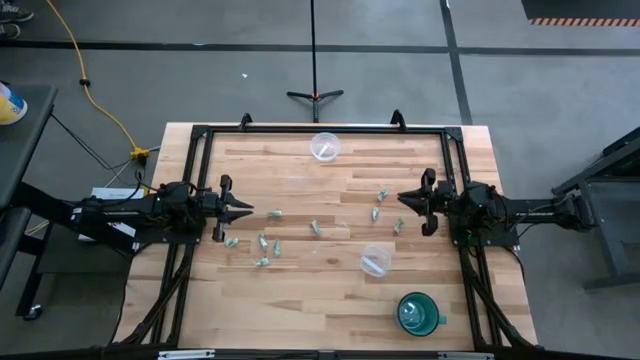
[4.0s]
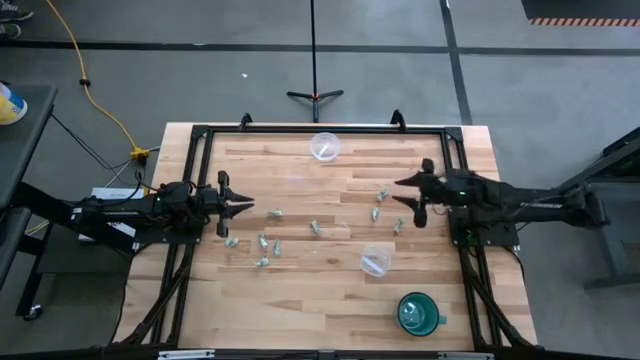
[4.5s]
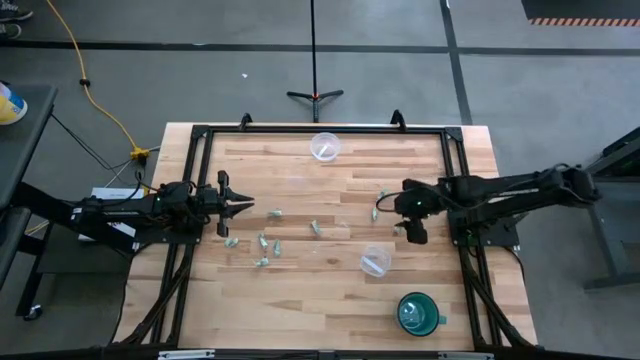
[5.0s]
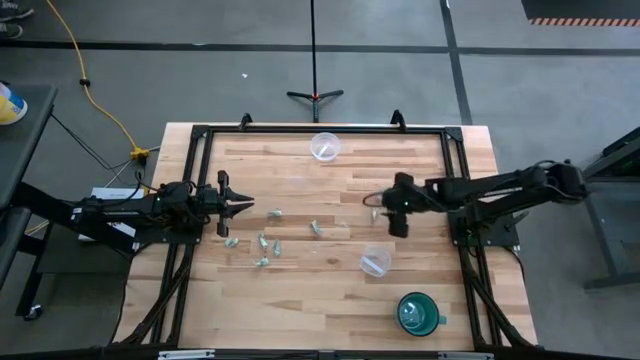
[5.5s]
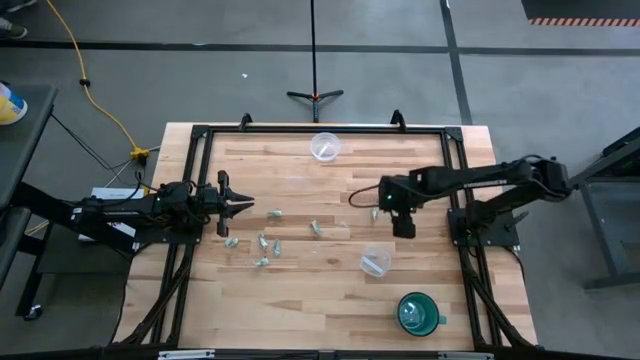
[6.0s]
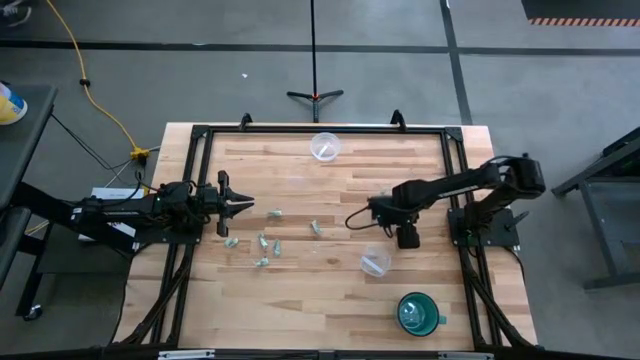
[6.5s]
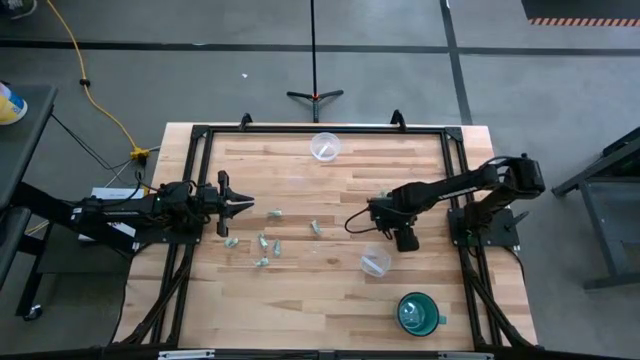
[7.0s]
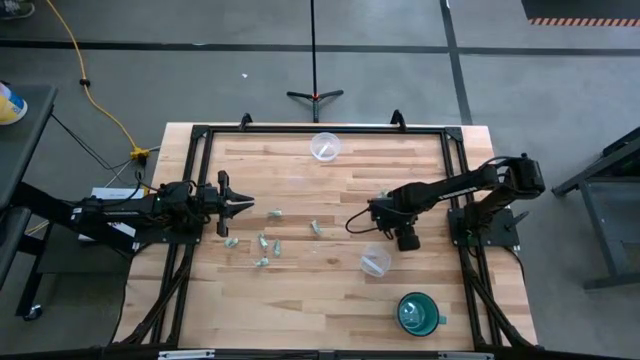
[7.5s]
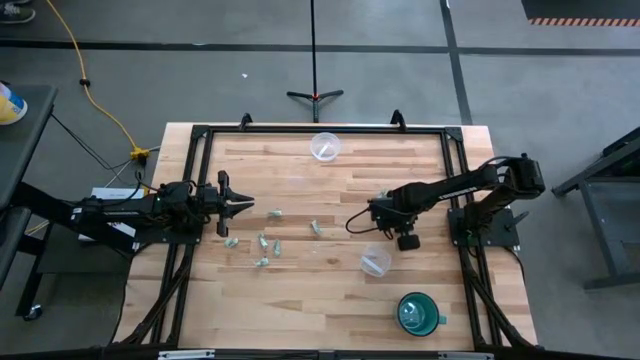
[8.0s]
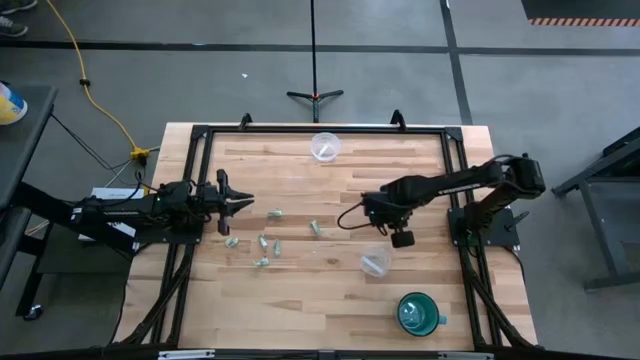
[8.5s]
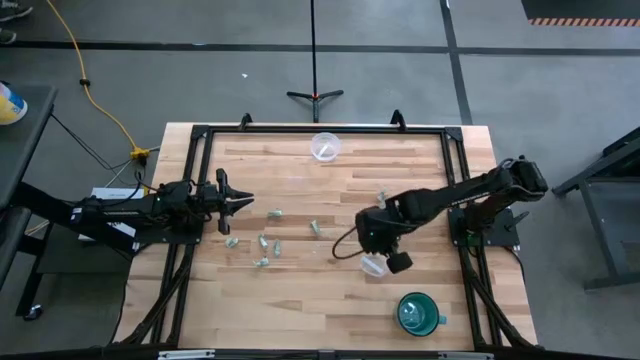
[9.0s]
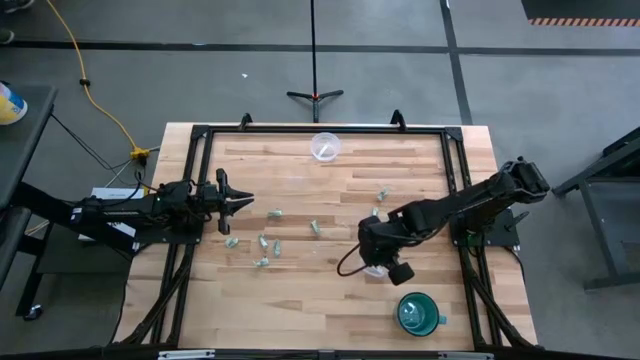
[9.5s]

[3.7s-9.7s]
Task: Pick and place Stevia / Truvia into bins
Put the light green stevia packet into the bottom transparent container

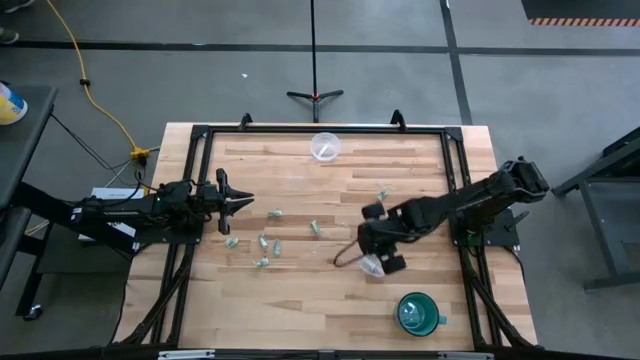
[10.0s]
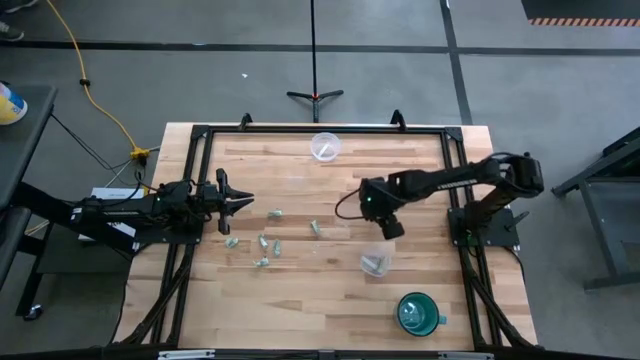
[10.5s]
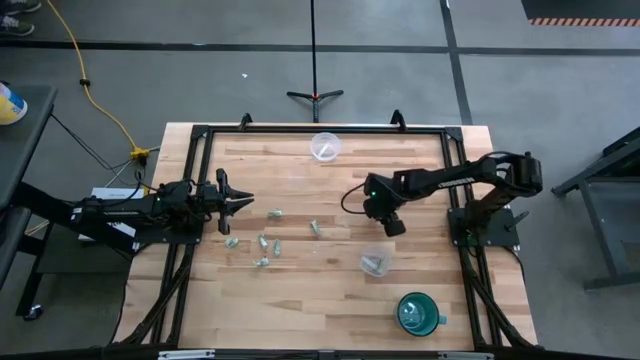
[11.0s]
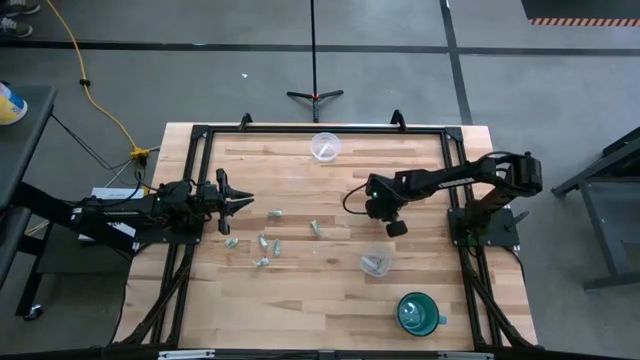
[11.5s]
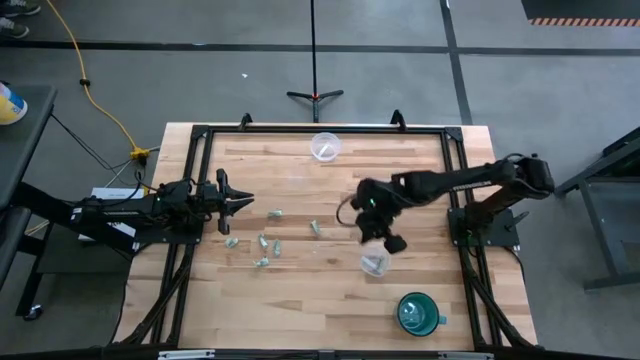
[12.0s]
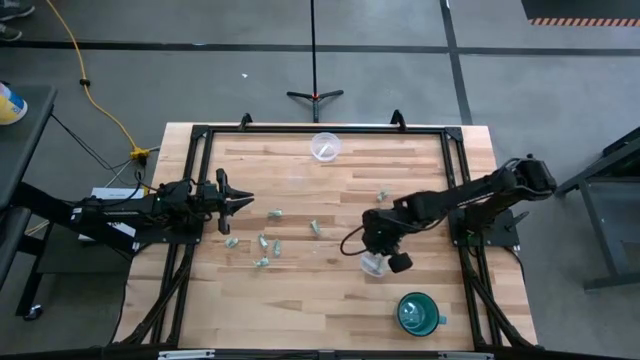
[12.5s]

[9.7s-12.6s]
Put the light green stevia packet into the bottom transparent container

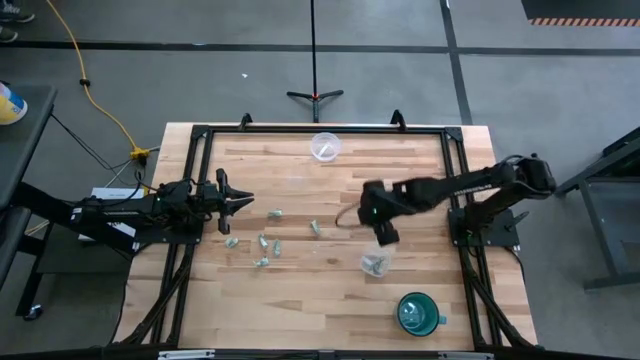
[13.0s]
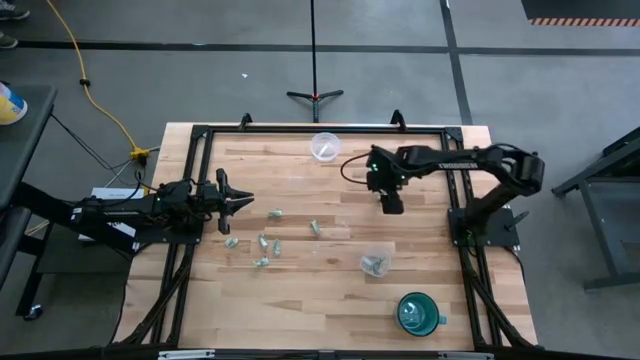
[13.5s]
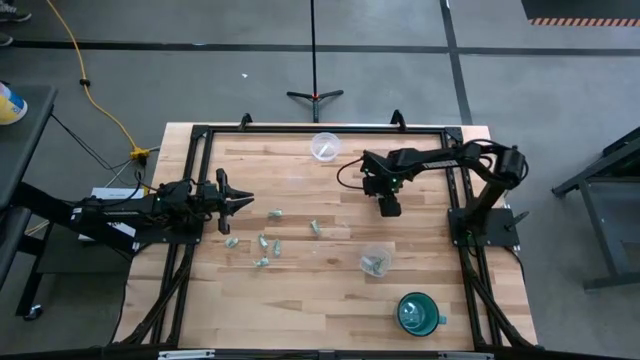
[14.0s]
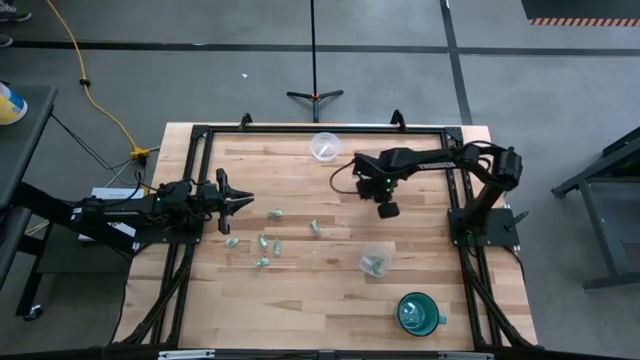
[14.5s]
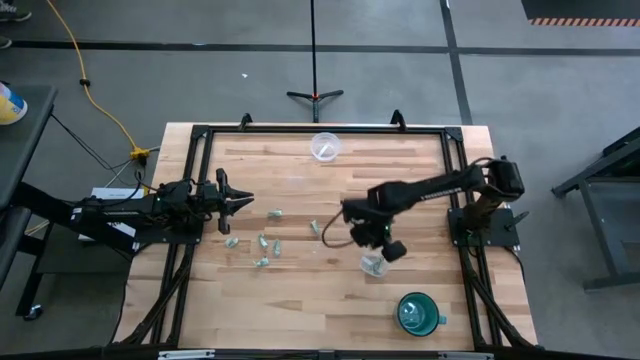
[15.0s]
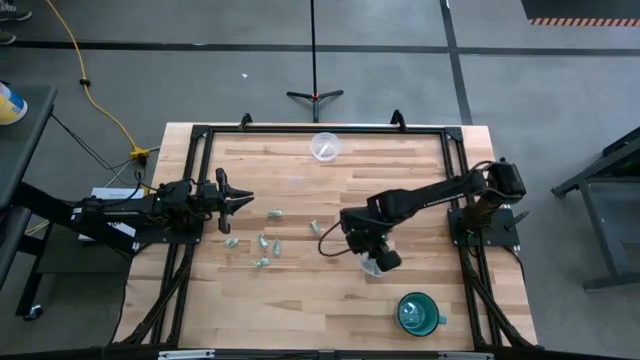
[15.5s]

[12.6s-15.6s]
Put the light green stevia packet into the bottom transparent container

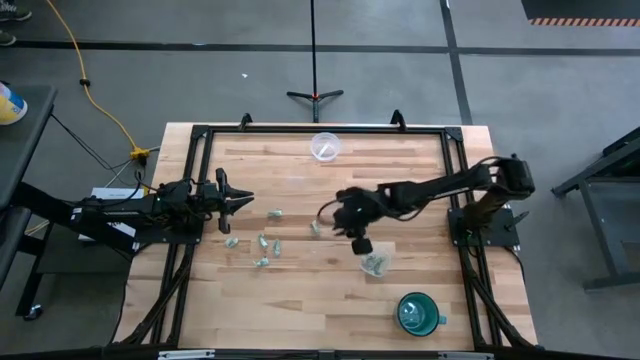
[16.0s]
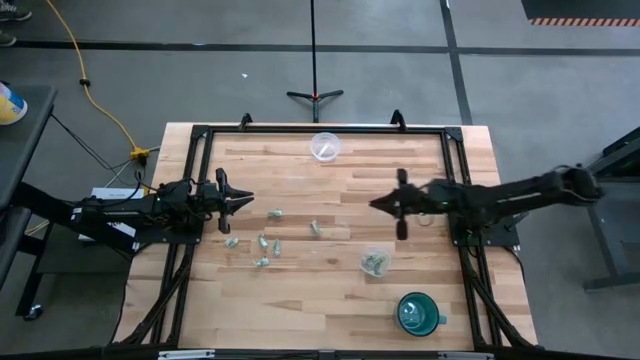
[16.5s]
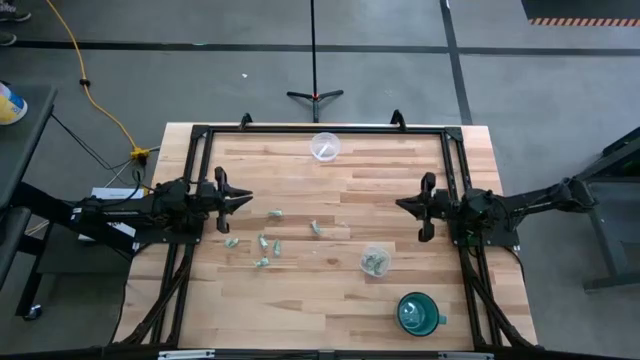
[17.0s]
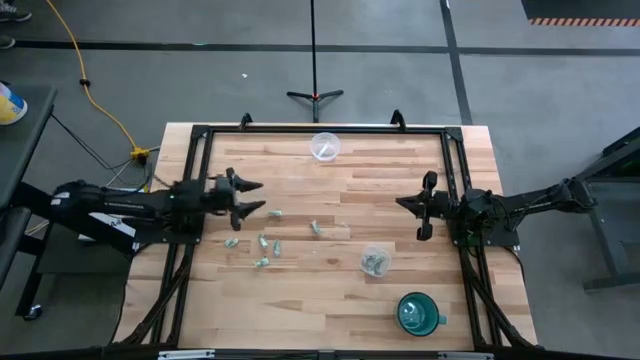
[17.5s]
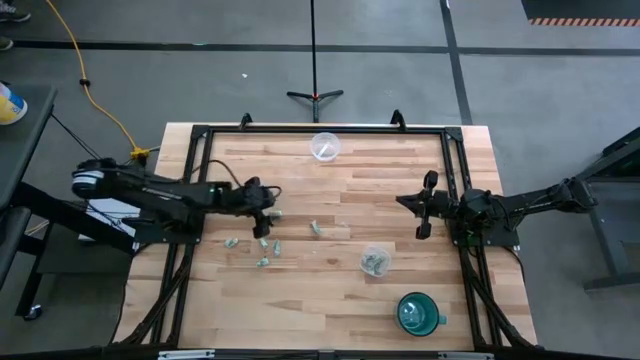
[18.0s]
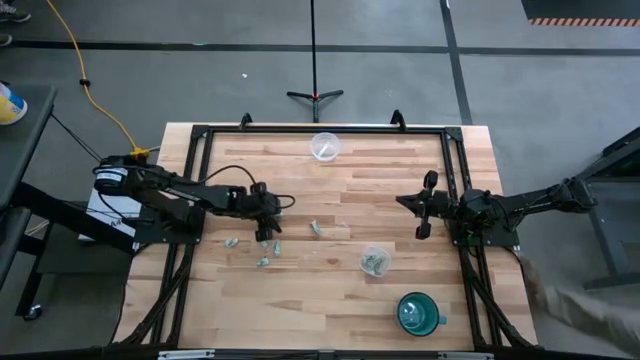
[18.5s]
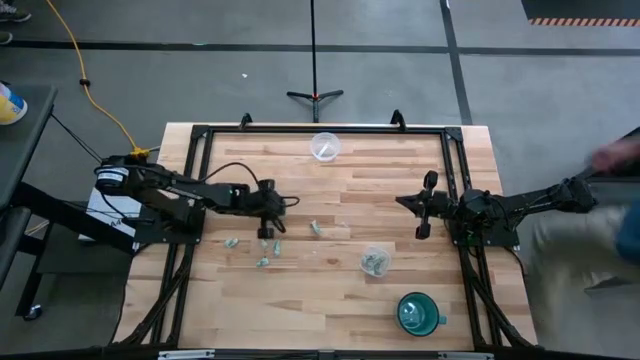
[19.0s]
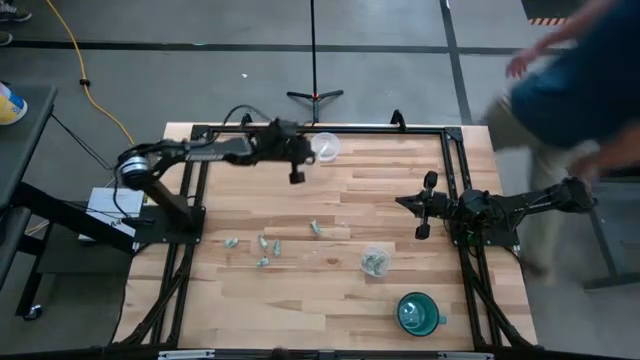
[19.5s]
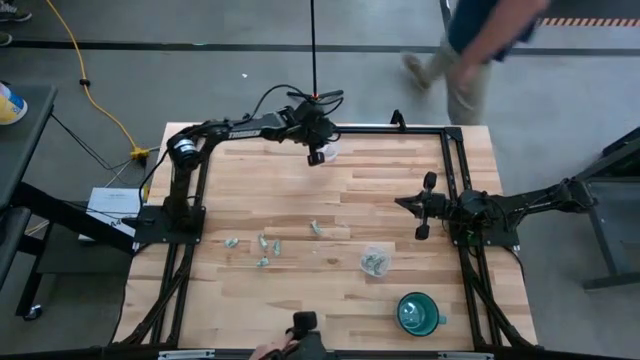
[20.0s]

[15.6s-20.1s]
Put the light green stevia packet into the top transparent container

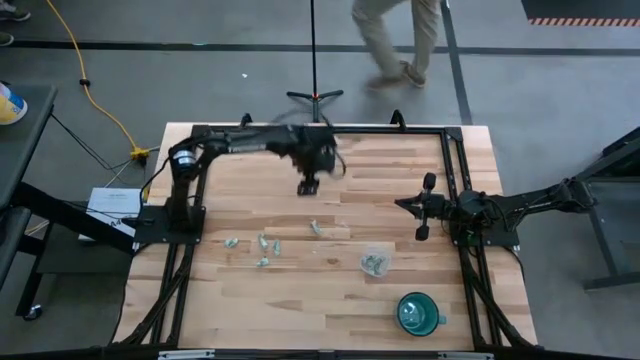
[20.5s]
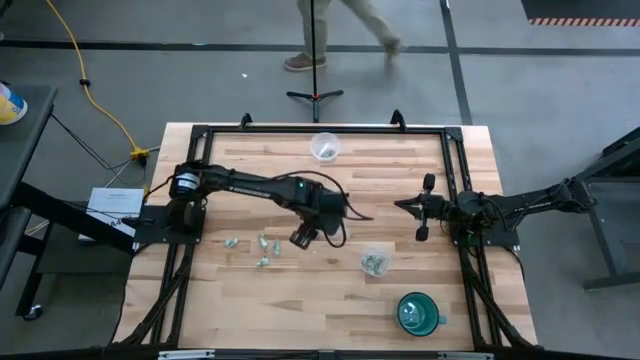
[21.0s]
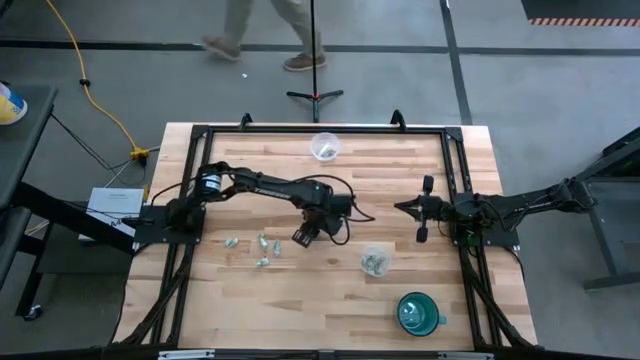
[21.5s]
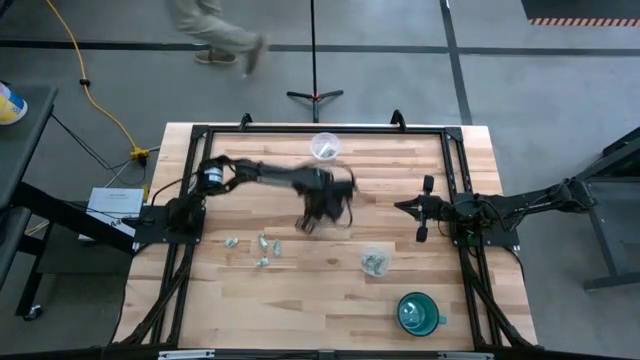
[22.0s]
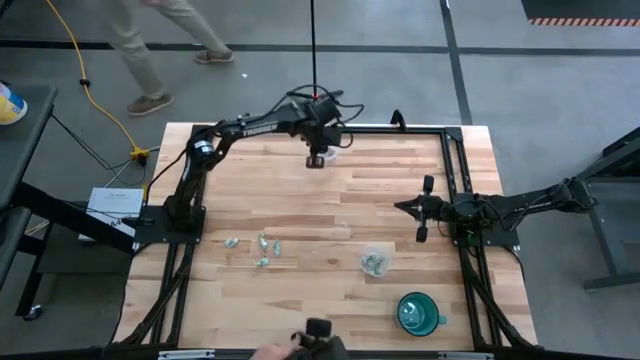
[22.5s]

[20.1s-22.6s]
Put the light green stevia packet into the top transparent container

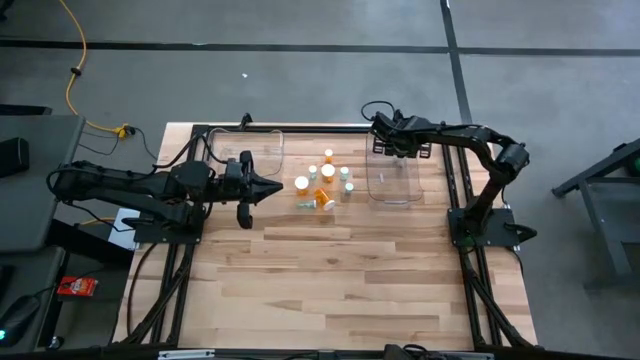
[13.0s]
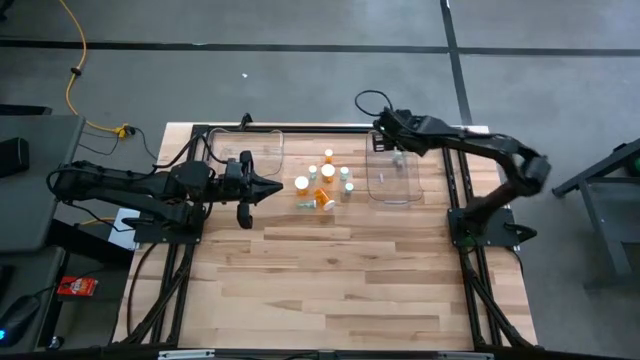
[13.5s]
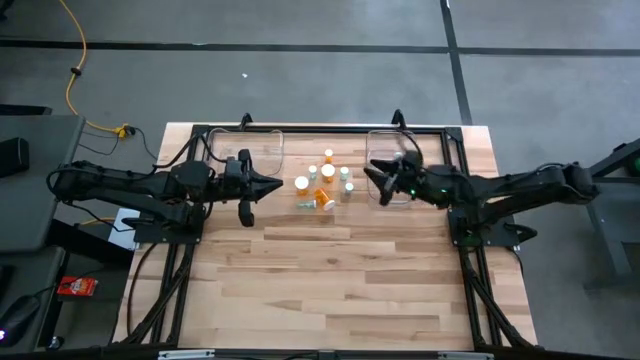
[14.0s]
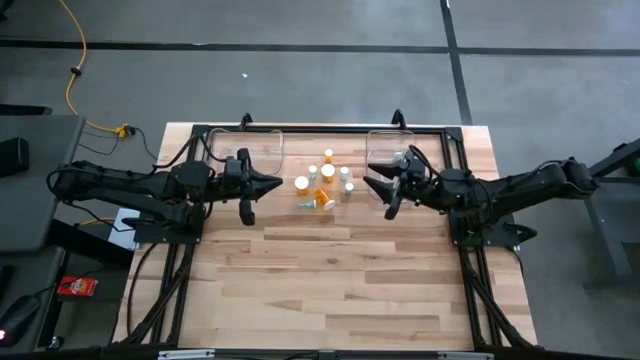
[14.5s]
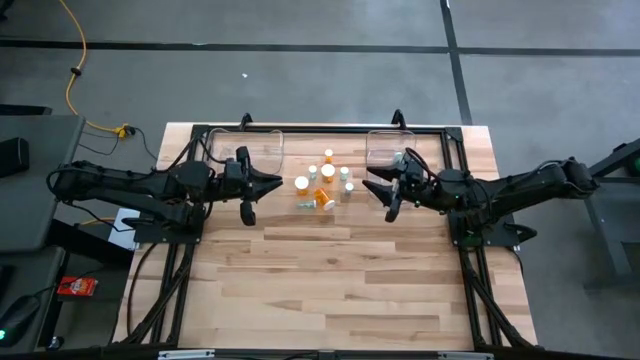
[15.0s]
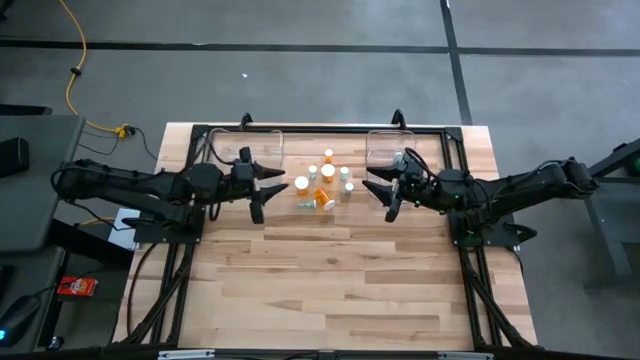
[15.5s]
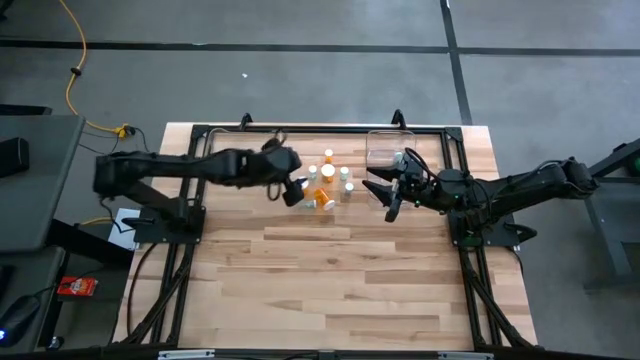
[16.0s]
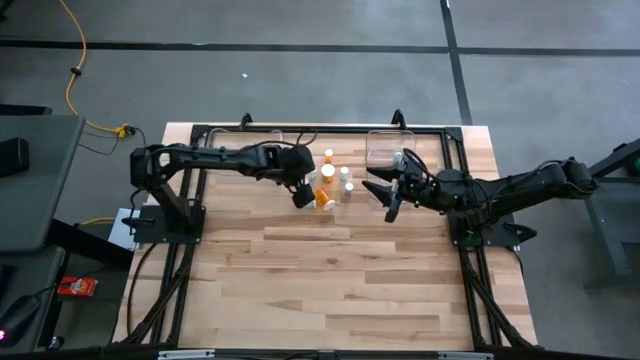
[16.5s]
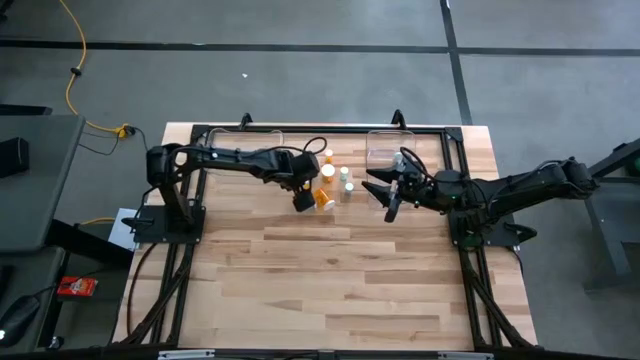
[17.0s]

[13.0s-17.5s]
Task: Pick and place medicine bottles into bin by pill shape (circle, oval)
Put the bottom left orange capsule bottle into the right transparent bin
